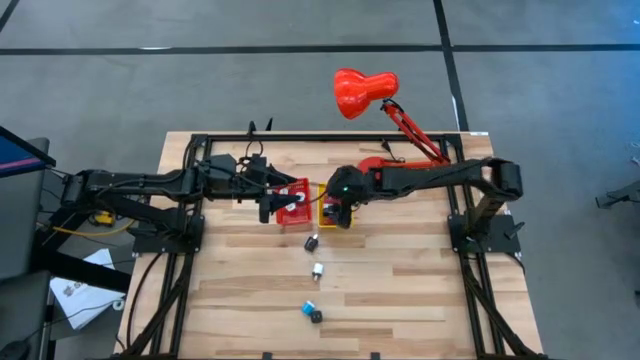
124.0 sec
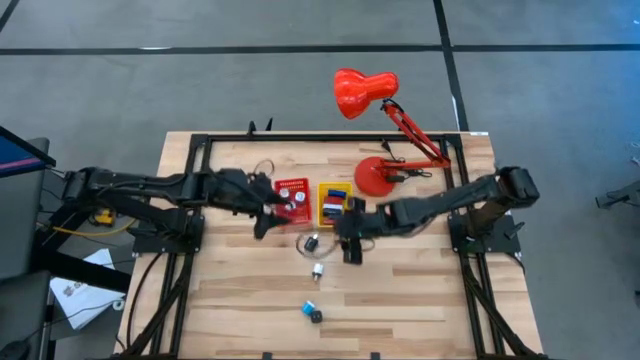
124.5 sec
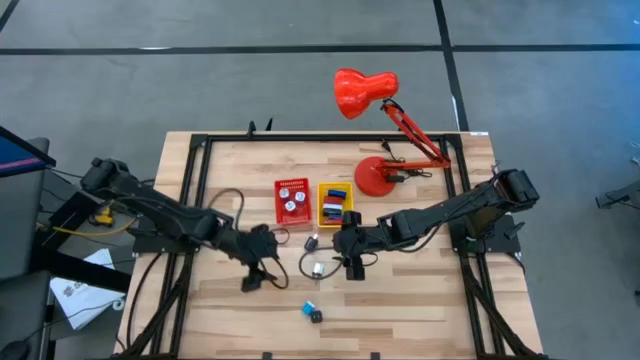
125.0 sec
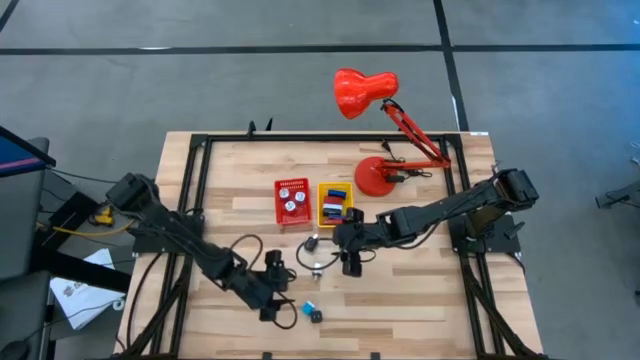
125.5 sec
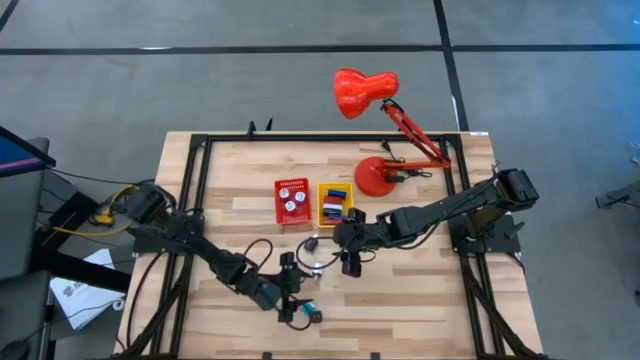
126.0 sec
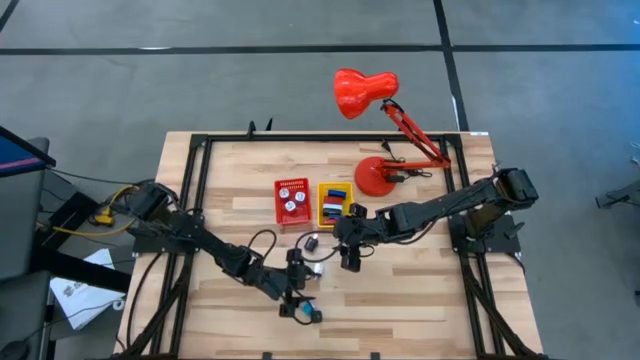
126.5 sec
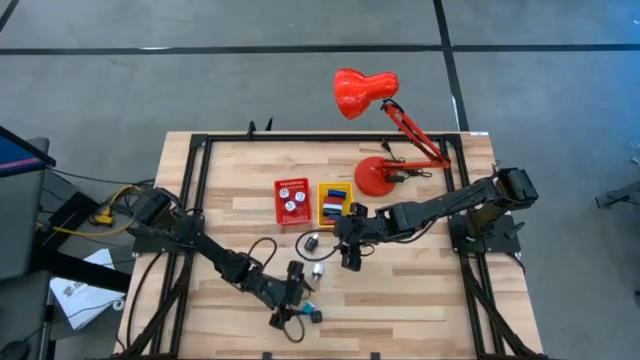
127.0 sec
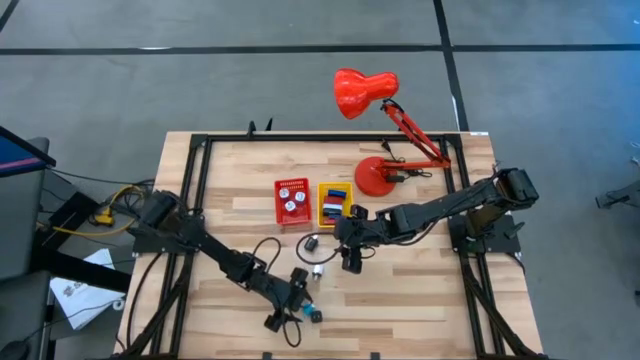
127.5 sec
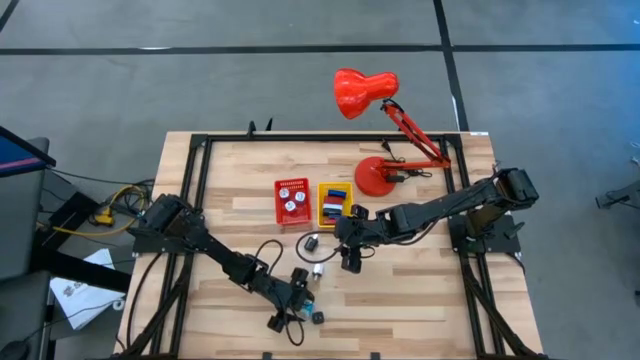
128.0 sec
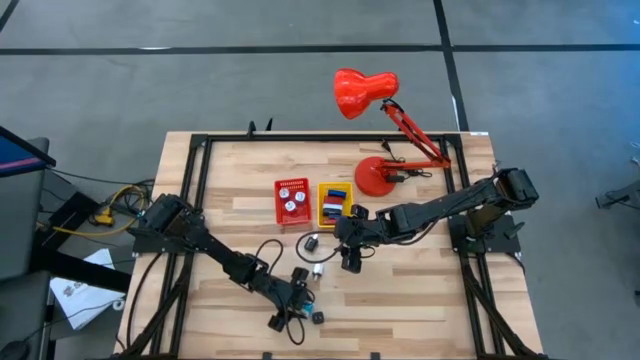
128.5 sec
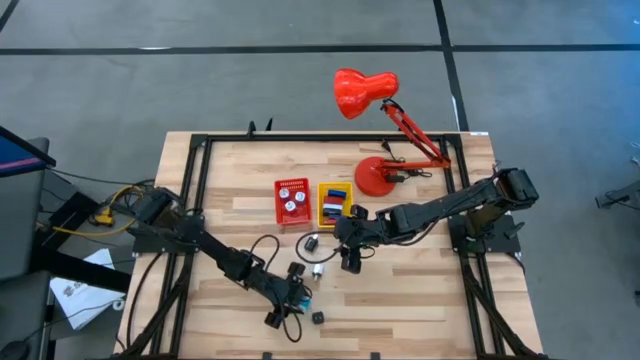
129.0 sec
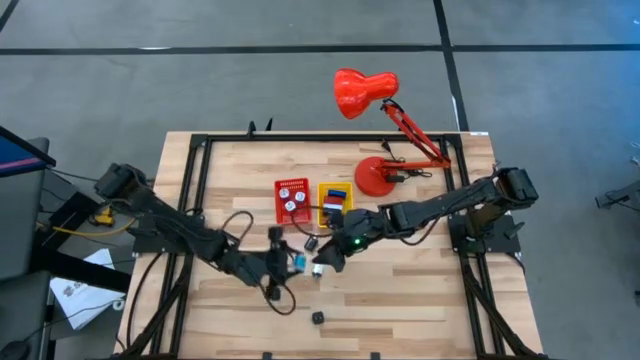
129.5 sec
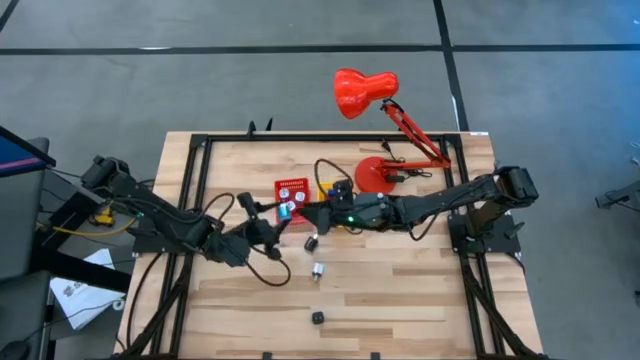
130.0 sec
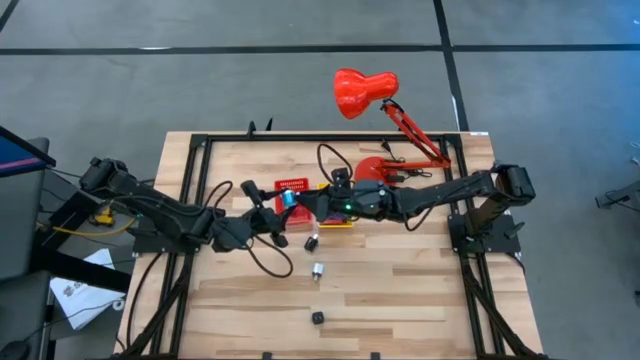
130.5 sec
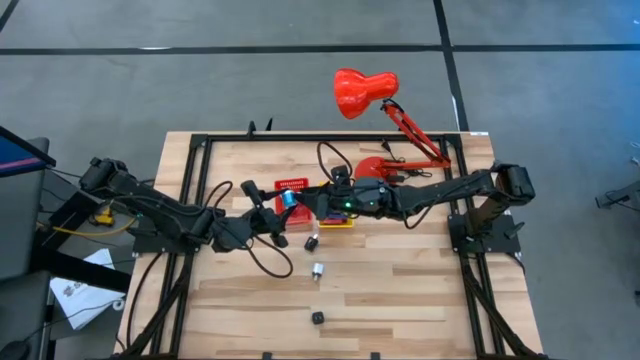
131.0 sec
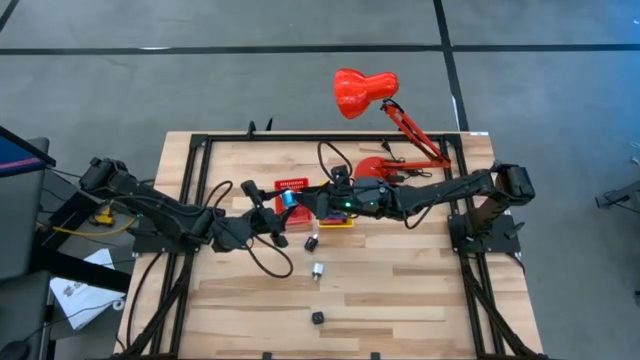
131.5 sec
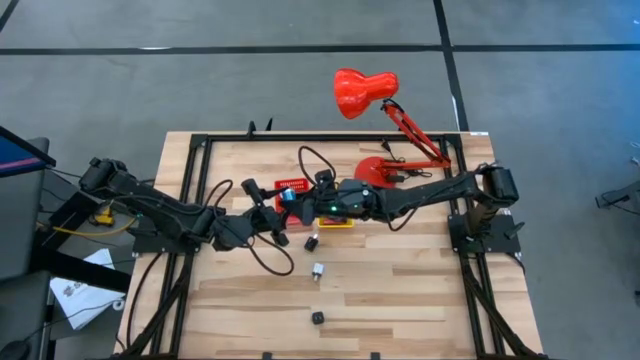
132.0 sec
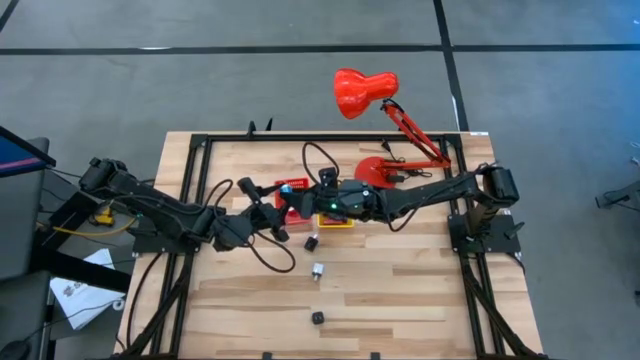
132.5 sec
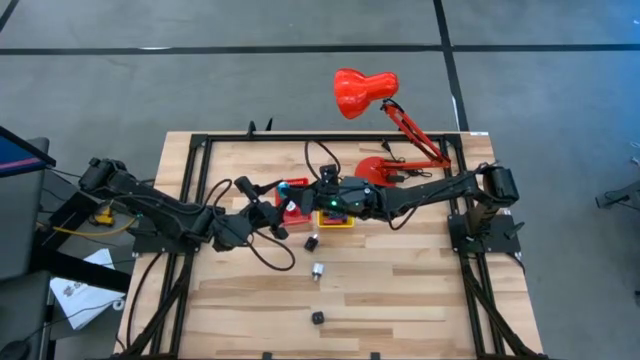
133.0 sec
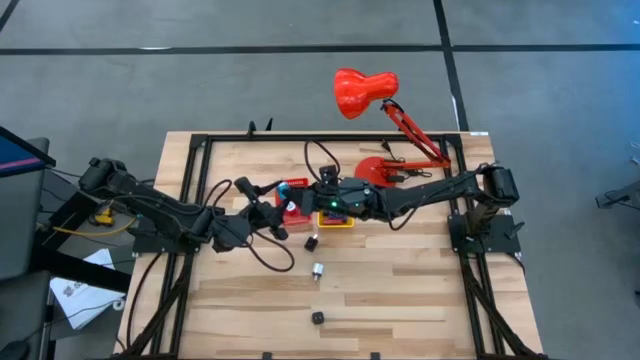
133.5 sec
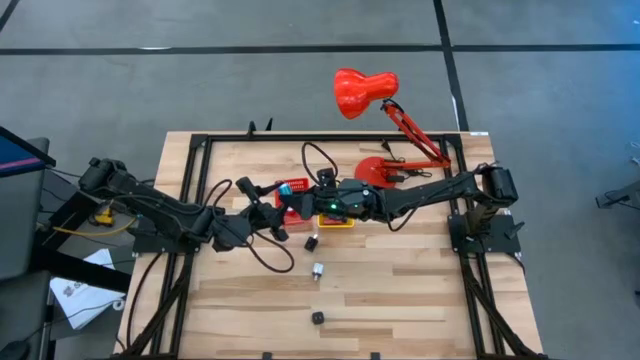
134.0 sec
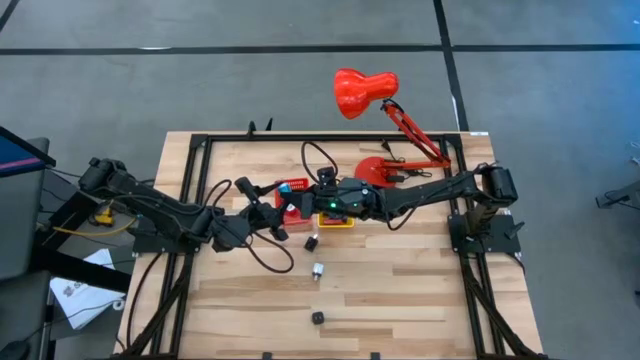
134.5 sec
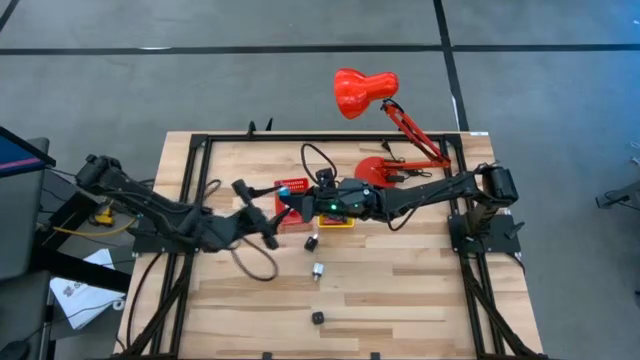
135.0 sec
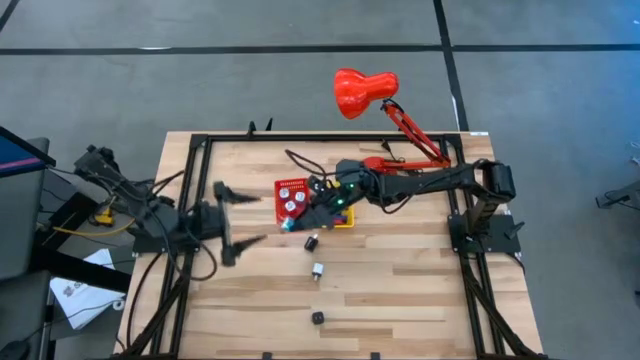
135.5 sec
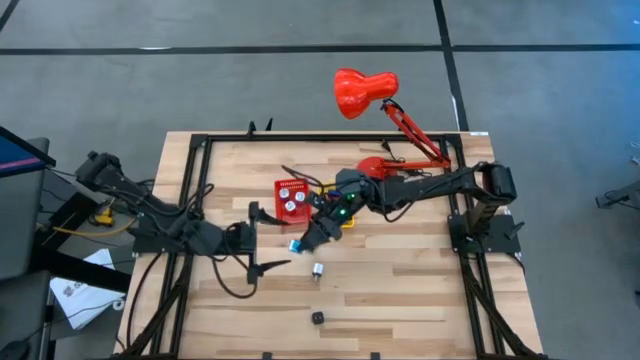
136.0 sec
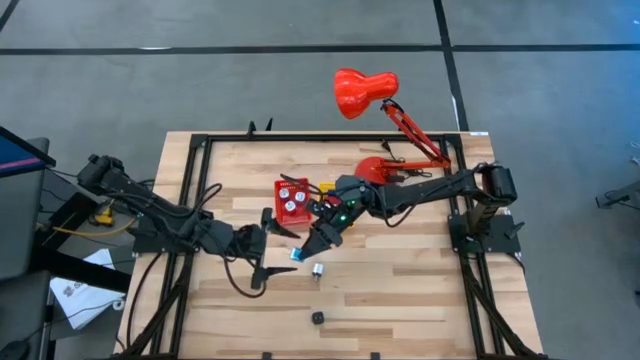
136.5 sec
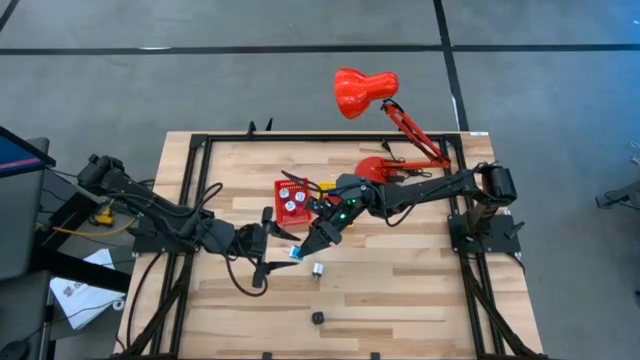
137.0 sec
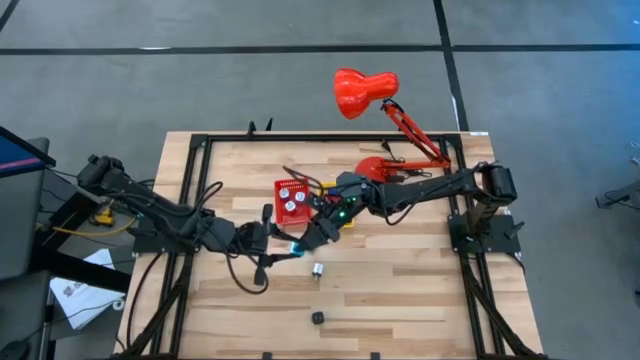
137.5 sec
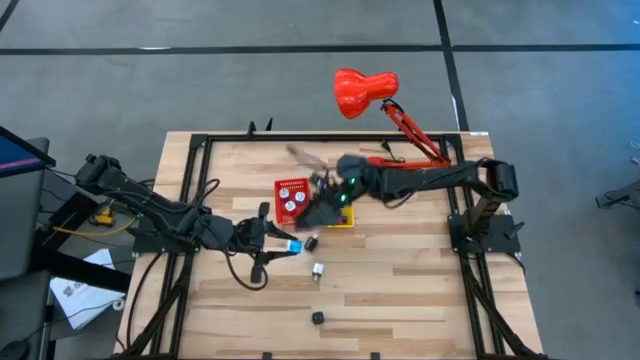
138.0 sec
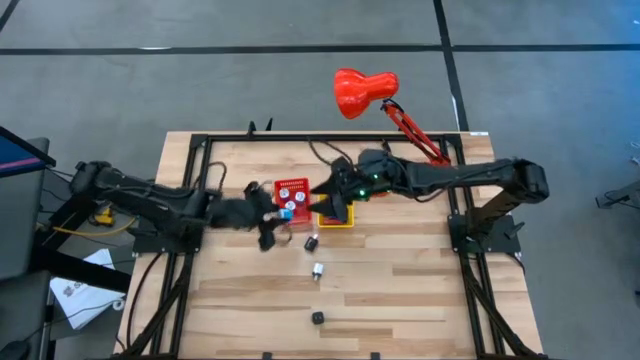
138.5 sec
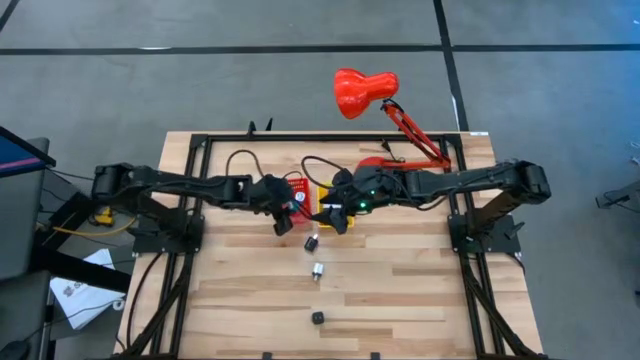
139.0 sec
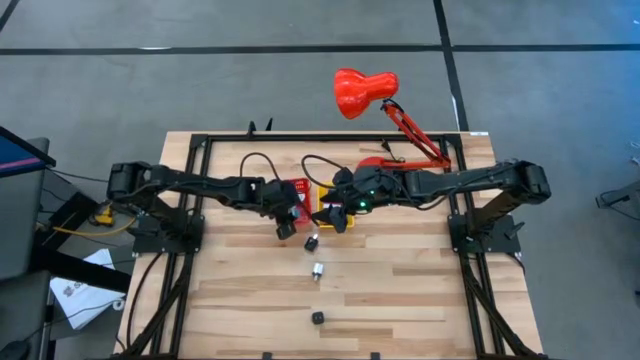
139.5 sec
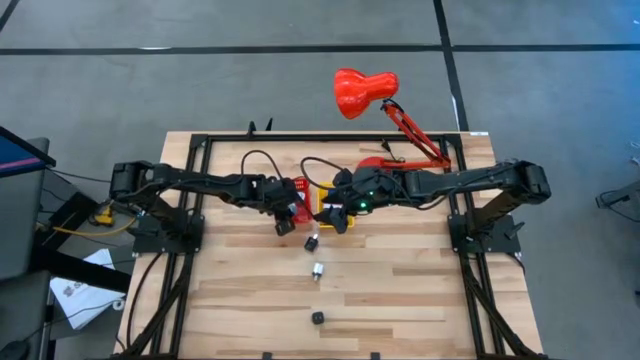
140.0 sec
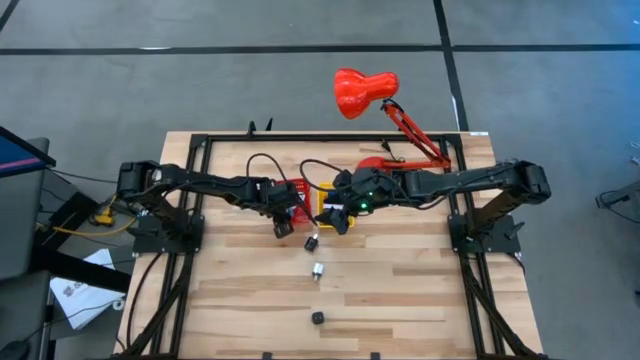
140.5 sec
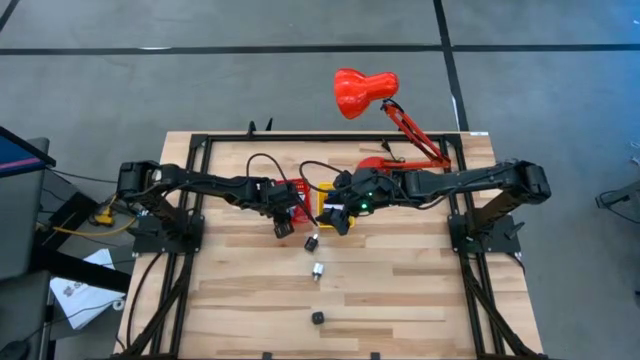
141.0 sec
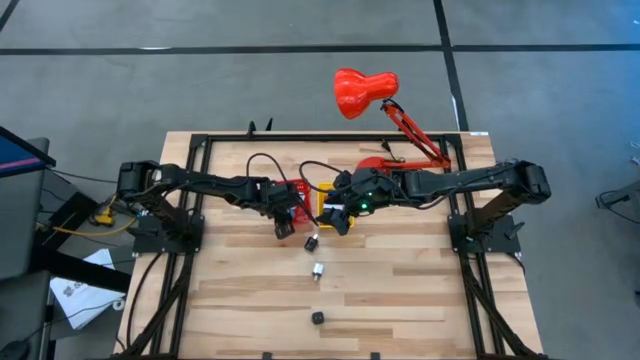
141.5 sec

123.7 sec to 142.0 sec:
Task: Pick & Place Office items
Put the light blue charger adapter into the red basket

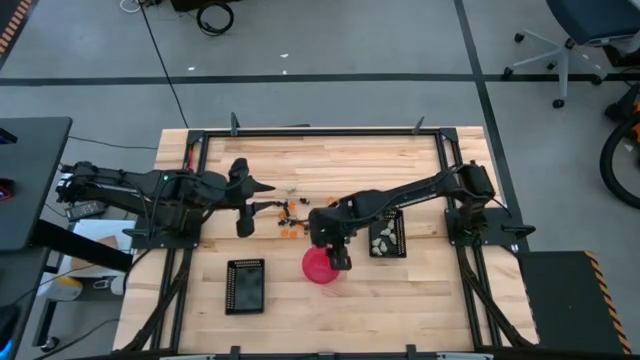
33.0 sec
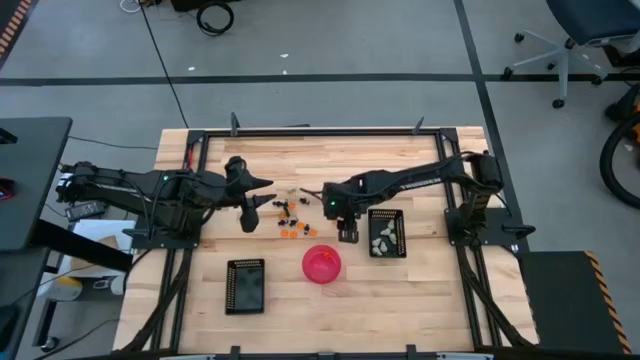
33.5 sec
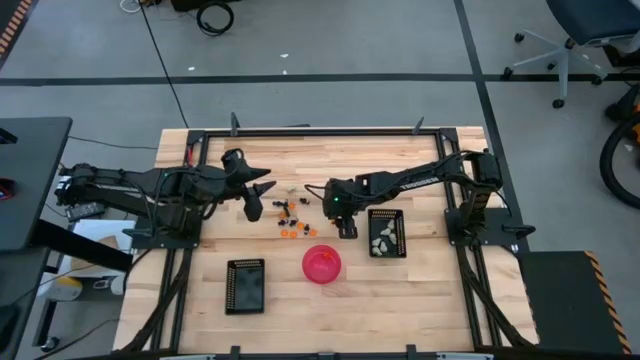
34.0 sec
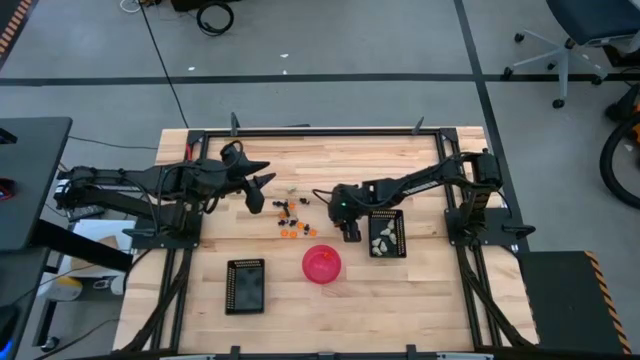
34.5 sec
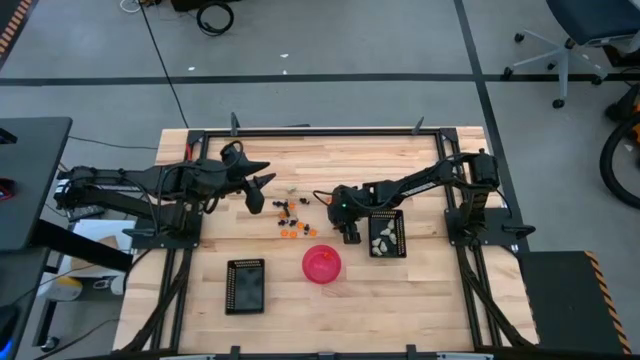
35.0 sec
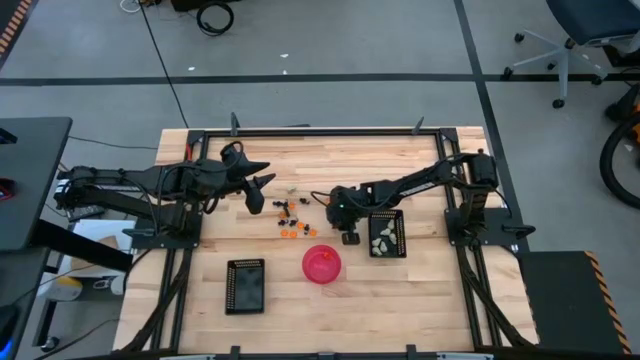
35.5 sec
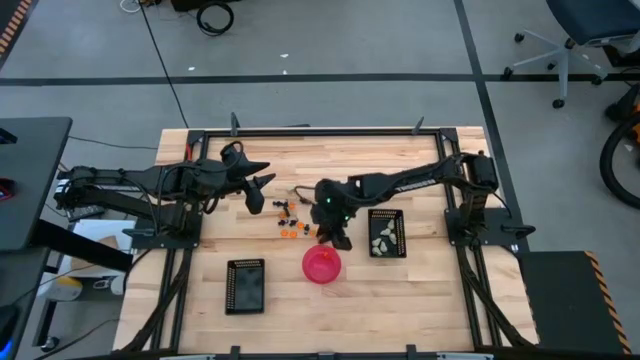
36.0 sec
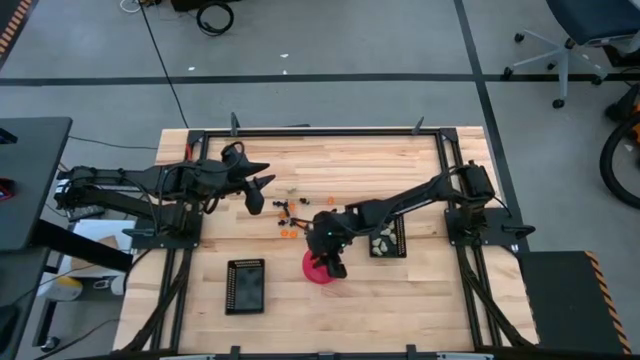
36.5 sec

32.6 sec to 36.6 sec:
Task: Sort Halloween decoration
Put the orange pumpkin toy into the pink bowl
